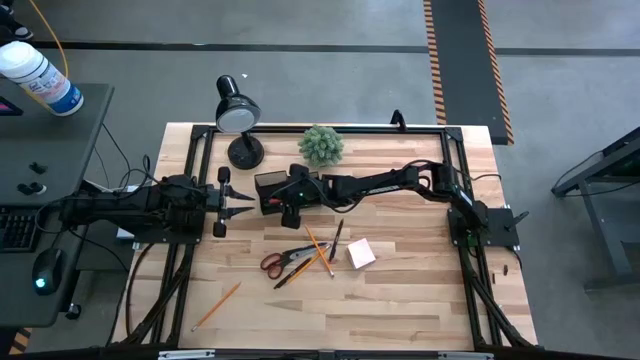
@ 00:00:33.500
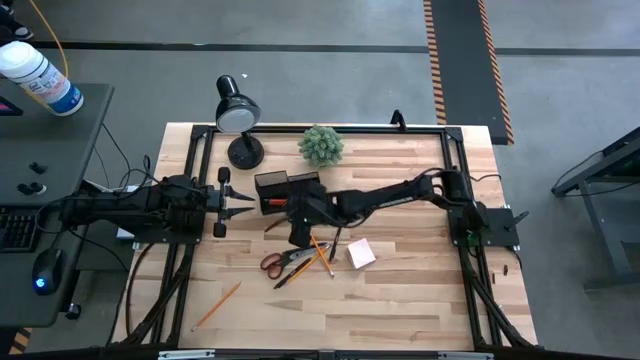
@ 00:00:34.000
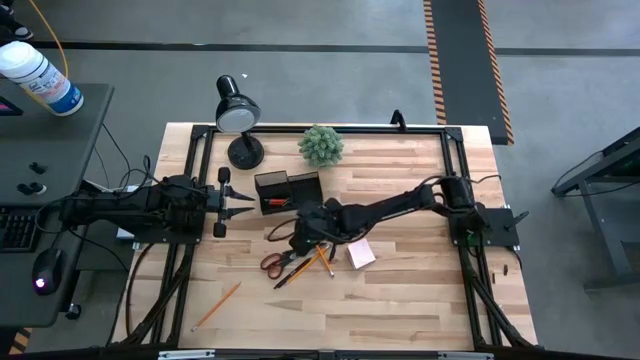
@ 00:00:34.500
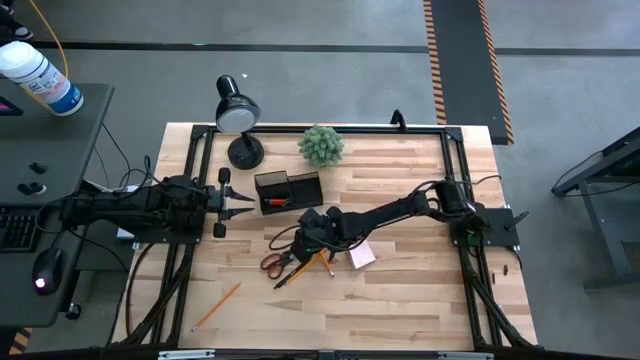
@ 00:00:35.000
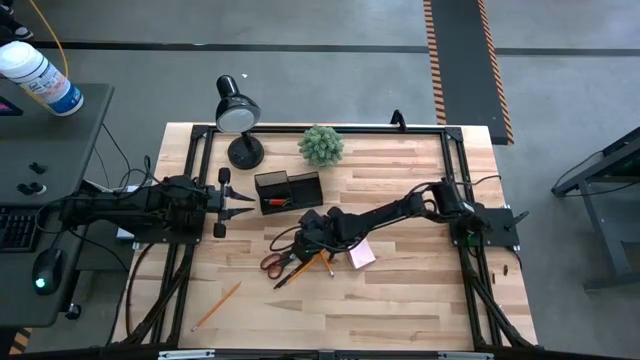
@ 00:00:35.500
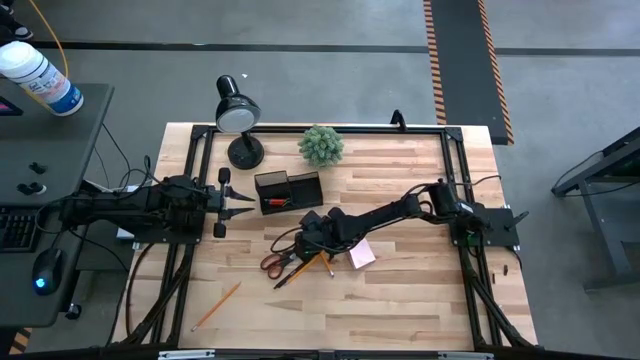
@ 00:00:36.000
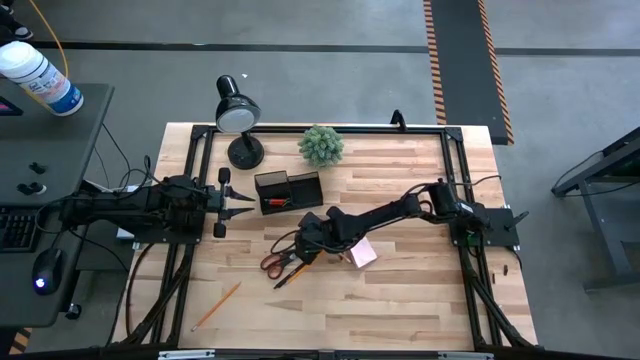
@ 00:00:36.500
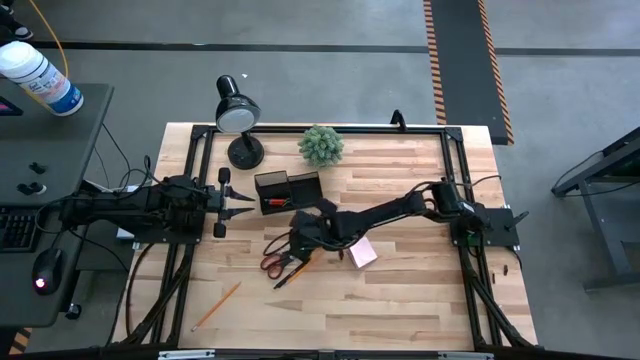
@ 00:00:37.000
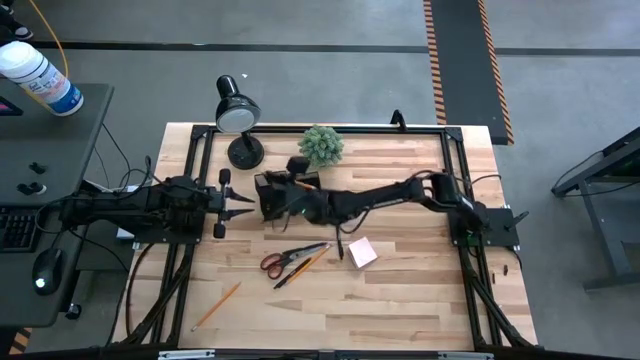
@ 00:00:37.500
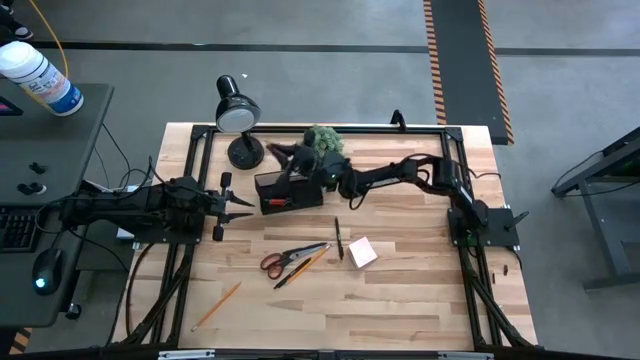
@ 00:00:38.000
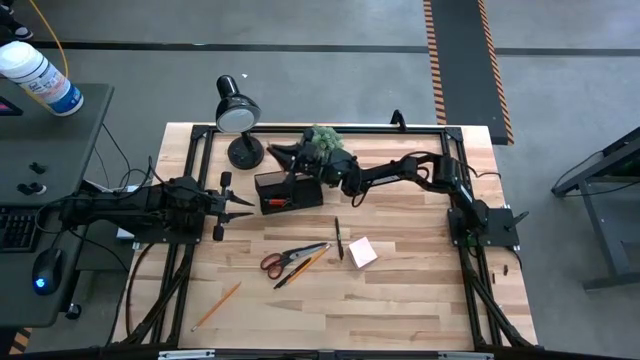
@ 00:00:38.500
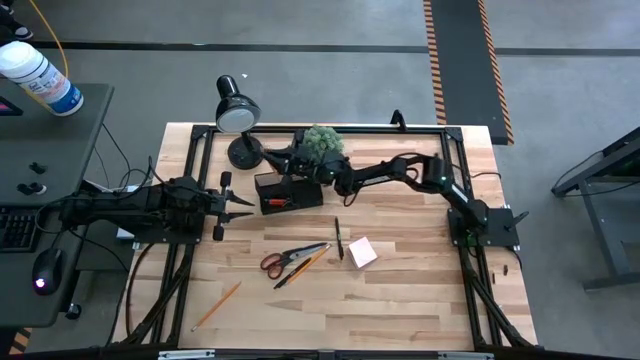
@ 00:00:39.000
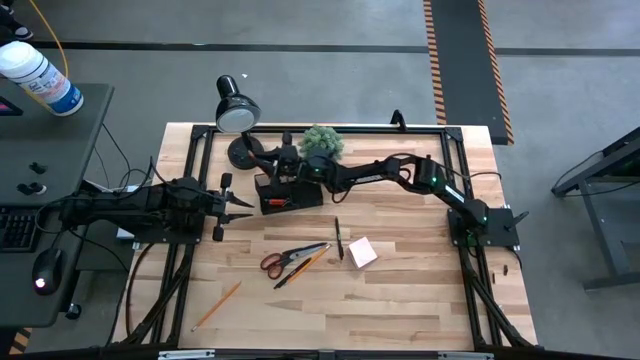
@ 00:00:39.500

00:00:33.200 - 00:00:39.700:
Task: Pick and place office supplies into organizer
Put the top pencil into the desktop organizer

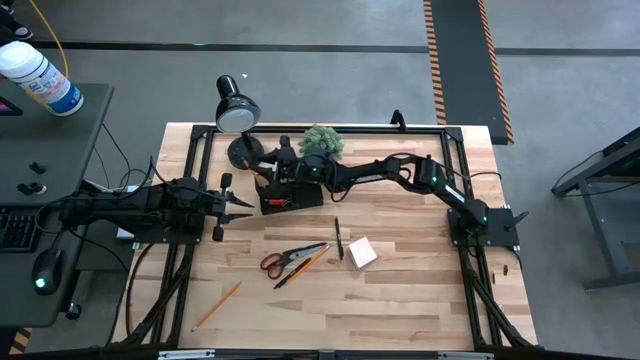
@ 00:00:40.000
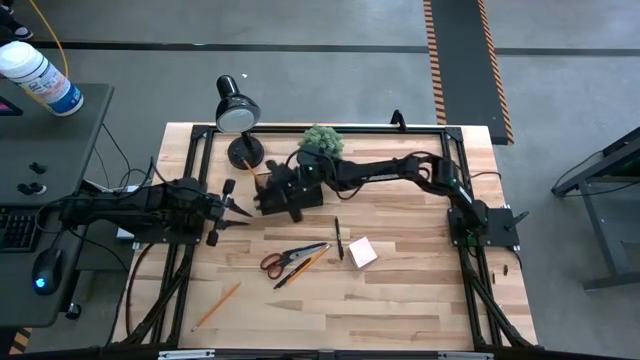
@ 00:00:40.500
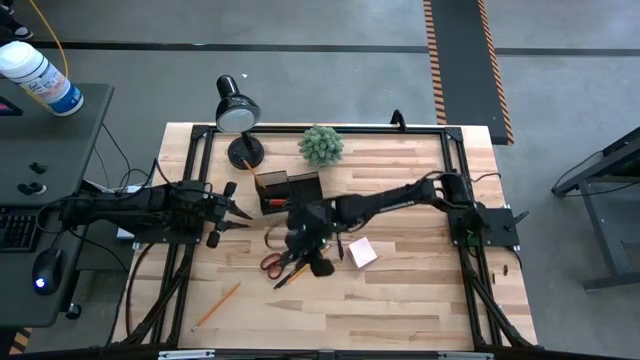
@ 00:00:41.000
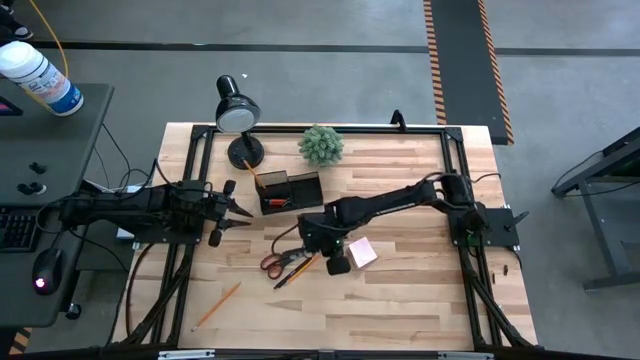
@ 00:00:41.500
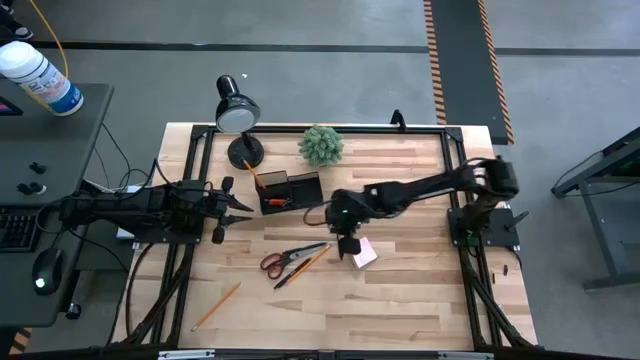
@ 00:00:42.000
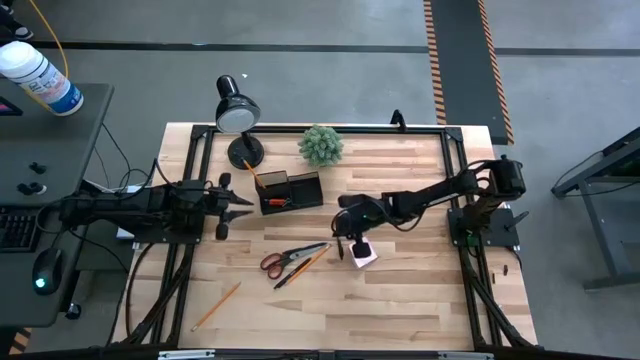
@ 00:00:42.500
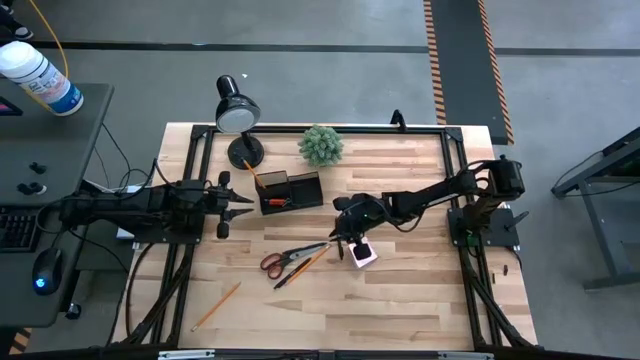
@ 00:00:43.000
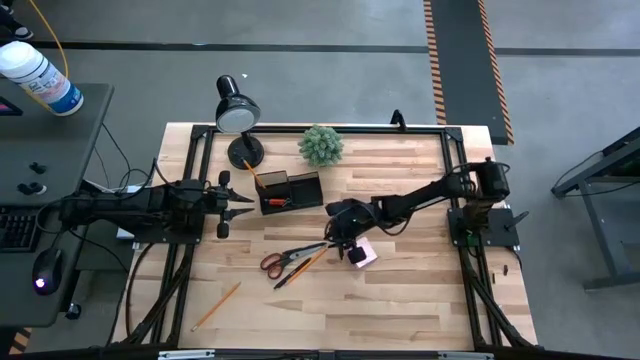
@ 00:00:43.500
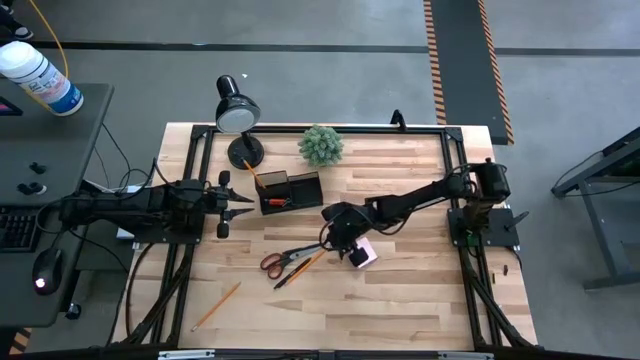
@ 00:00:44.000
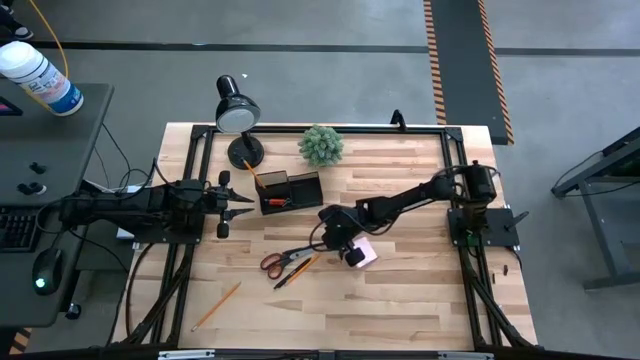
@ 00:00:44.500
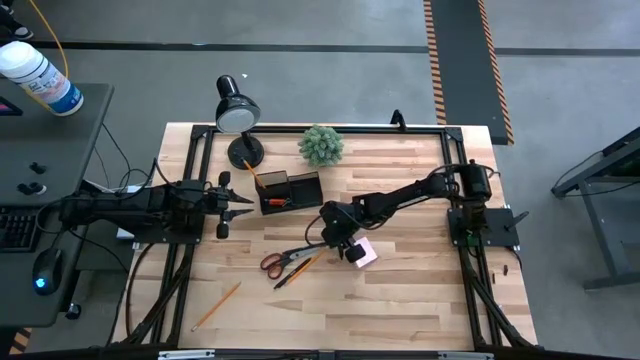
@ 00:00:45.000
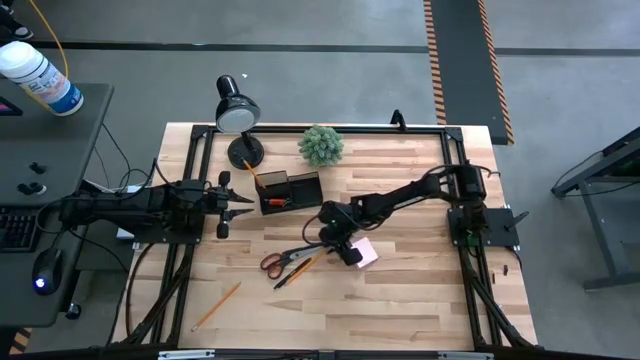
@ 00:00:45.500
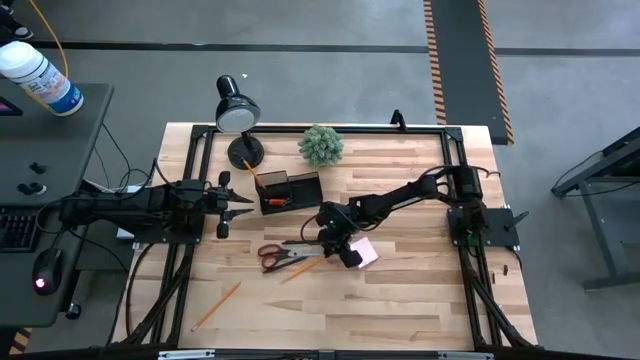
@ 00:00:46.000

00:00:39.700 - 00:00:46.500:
Put the right pencil into the desktop organizer

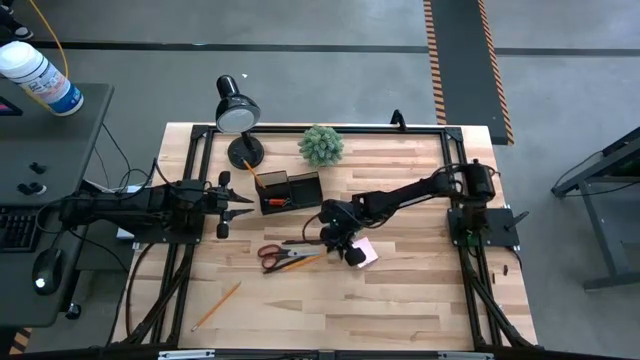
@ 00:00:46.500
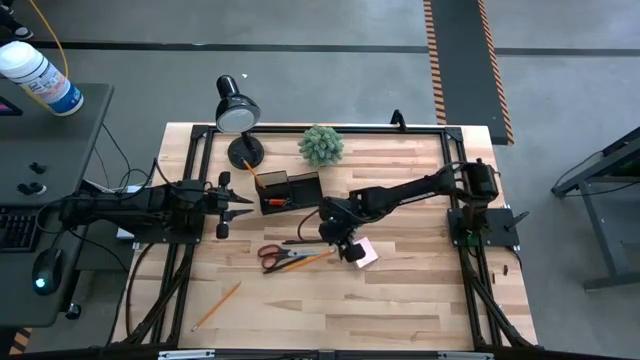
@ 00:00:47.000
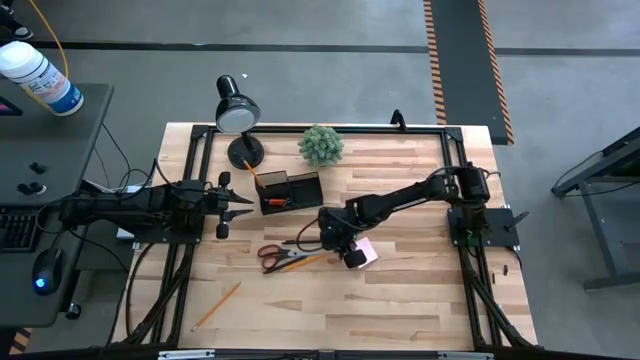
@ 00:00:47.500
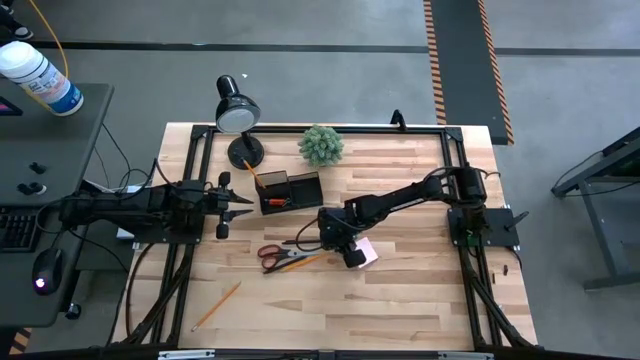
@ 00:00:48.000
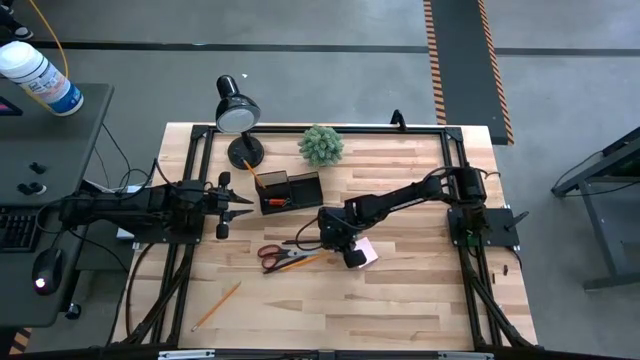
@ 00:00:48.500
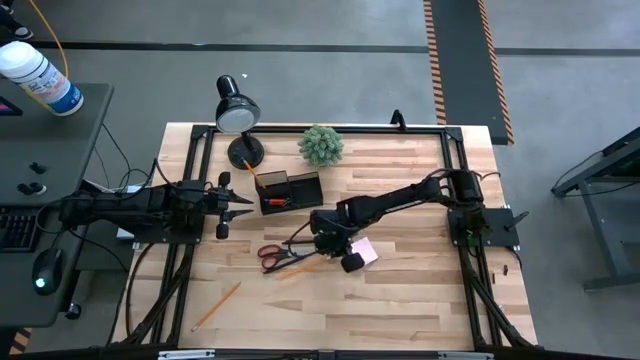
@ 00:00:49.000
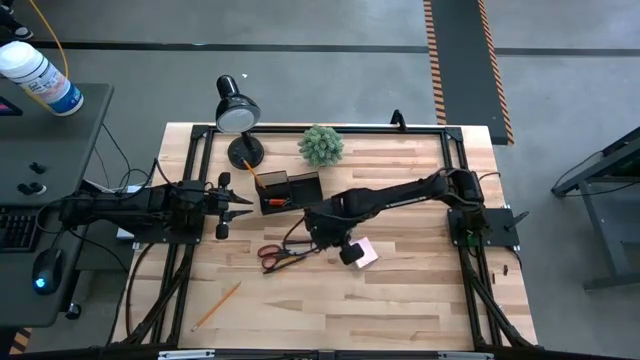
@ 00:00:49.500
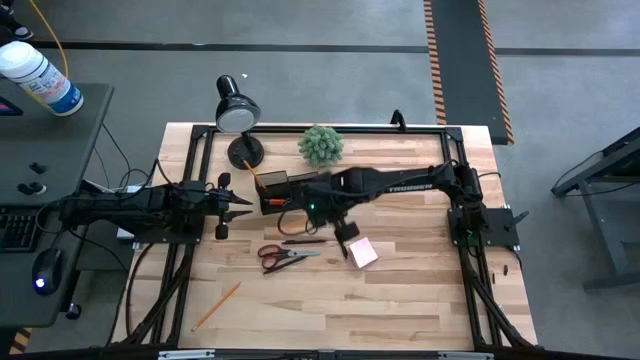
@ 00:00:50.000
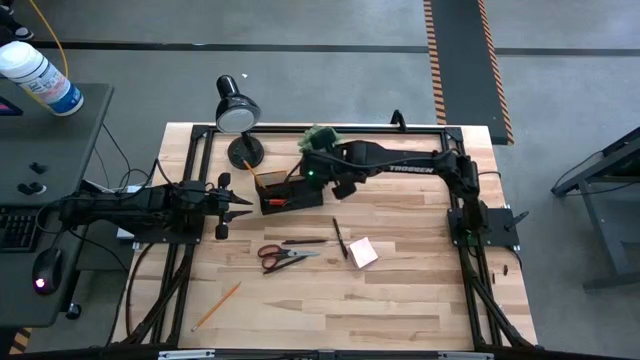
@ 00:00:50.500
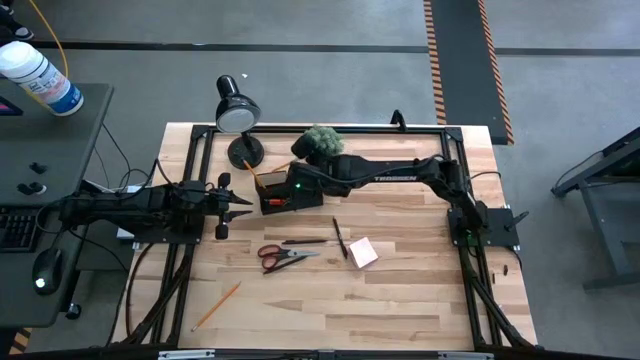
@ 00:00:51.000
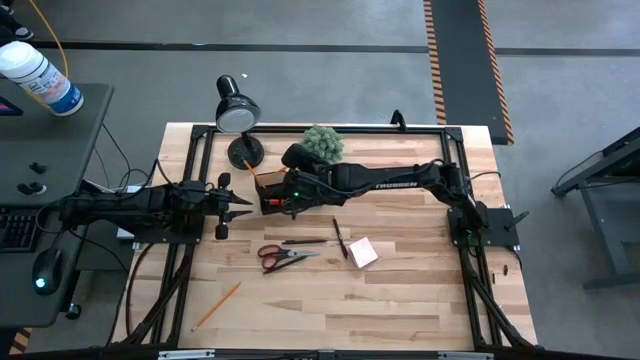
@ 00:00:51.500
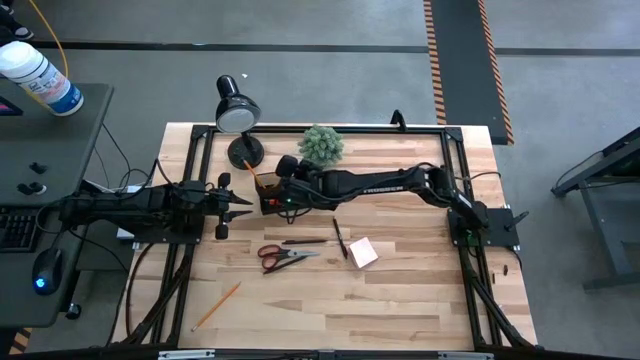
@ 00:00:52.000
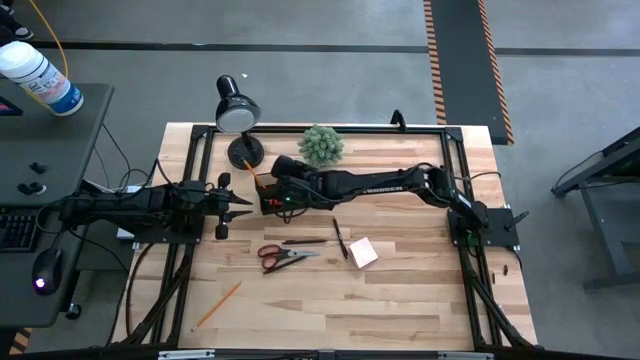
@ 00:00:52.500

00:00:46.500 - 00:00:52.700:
Put the right pencil into the desktop organizer

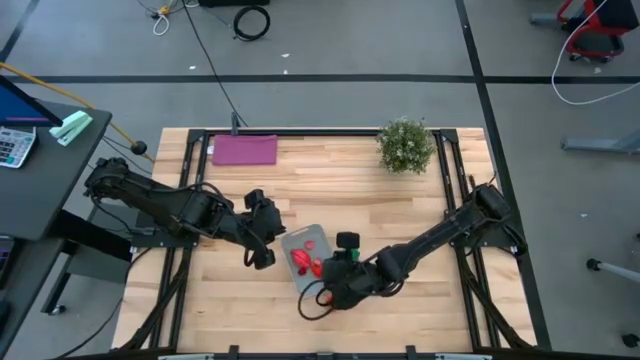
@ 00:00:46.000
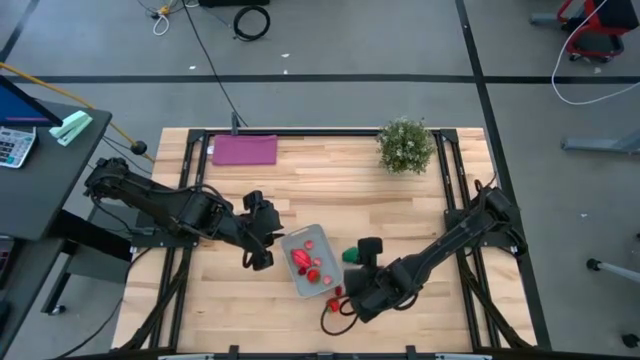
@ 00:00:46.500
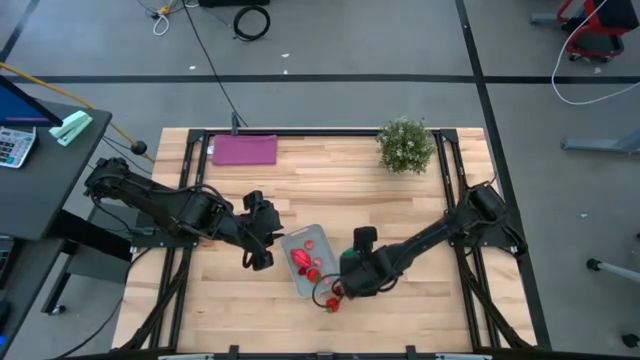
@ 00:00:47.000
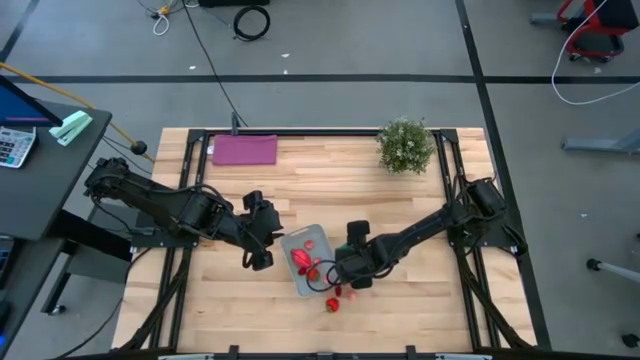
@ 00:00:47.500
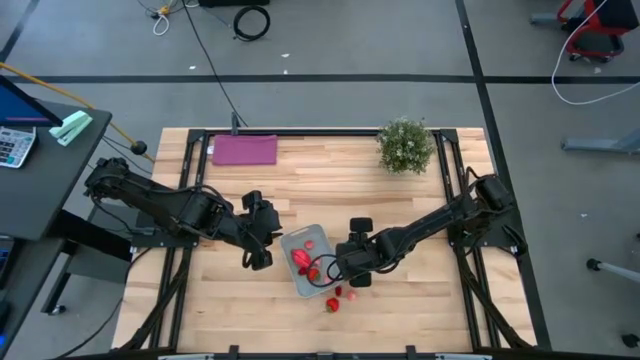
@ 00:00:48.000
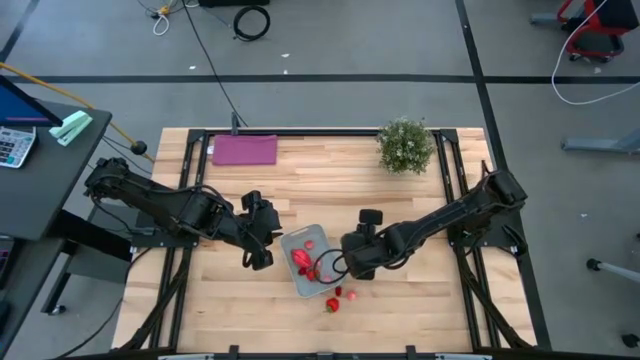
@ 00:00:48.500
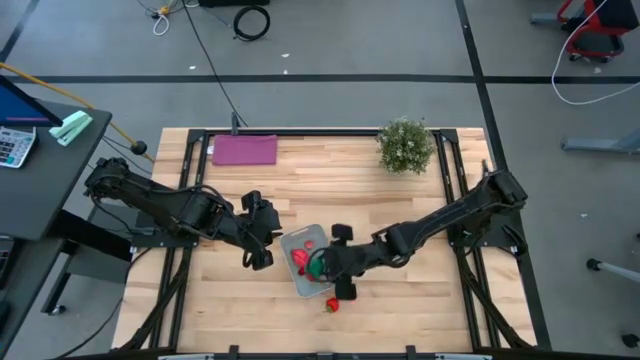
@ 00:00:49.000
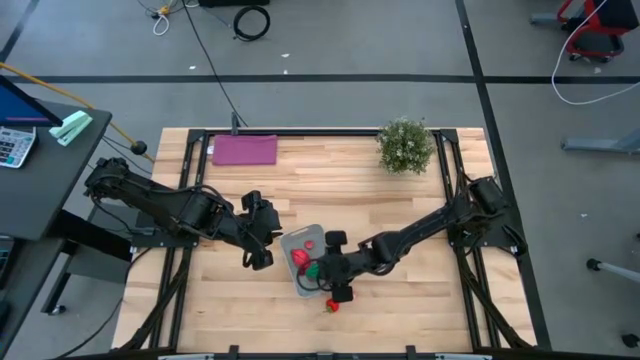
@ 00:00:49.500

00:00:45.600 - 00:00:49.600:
Task: Pick and placing Produce into tupperware
Put the green bell pepper into the gray bin
